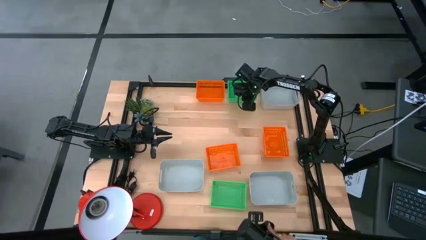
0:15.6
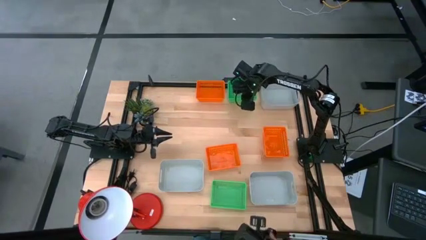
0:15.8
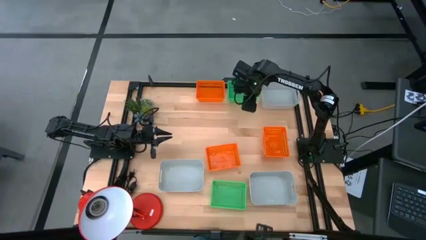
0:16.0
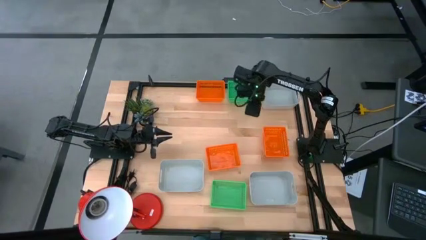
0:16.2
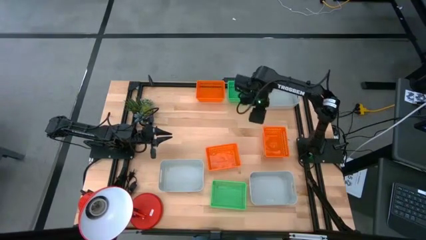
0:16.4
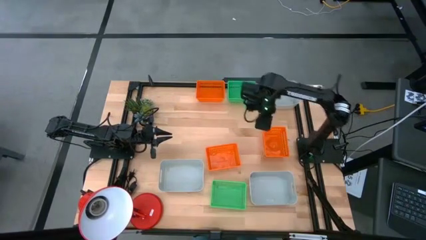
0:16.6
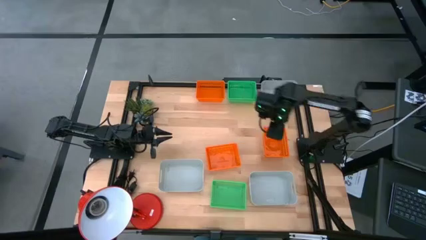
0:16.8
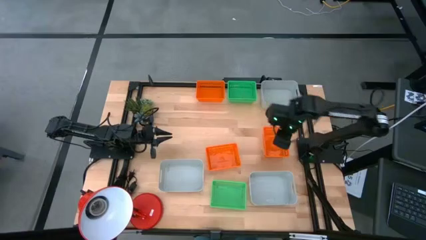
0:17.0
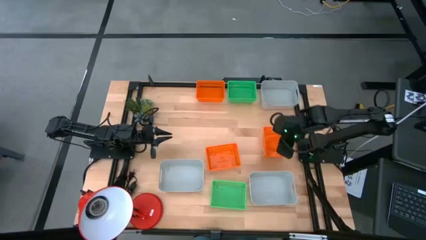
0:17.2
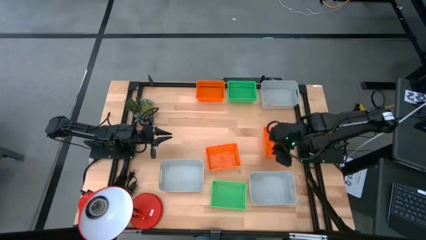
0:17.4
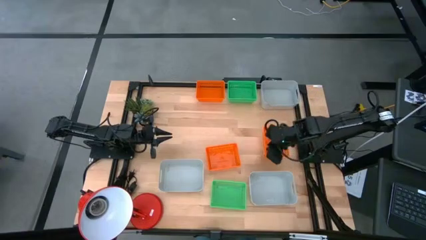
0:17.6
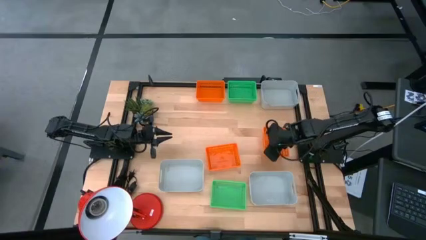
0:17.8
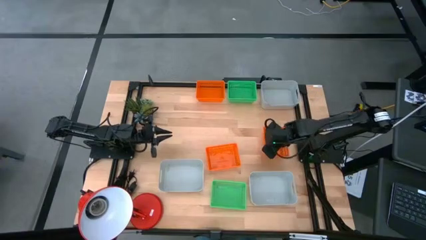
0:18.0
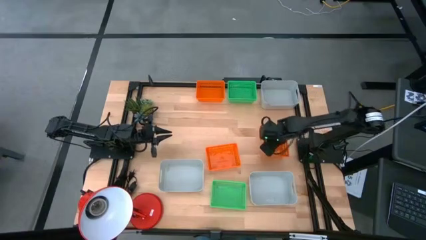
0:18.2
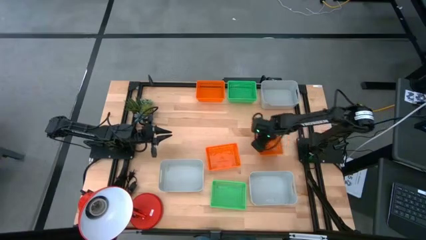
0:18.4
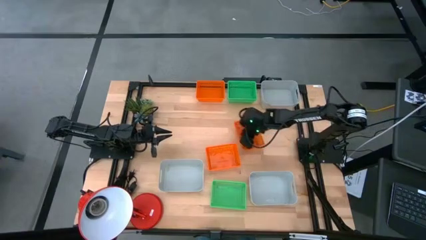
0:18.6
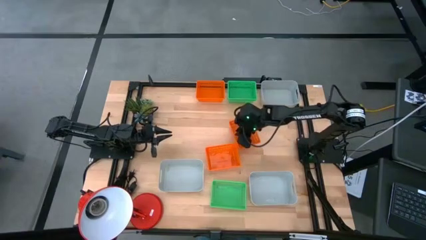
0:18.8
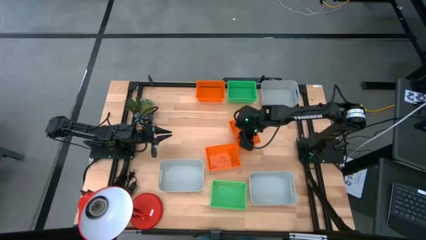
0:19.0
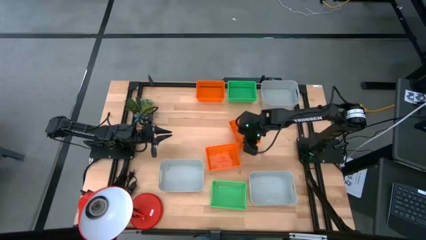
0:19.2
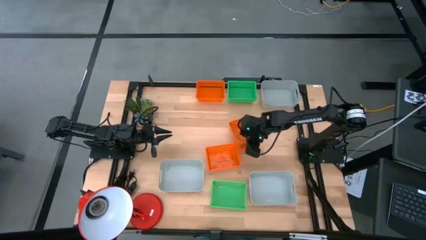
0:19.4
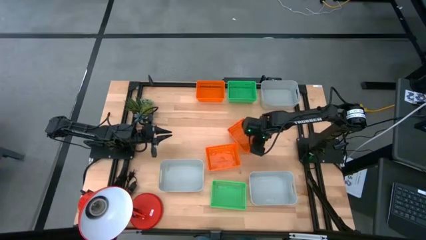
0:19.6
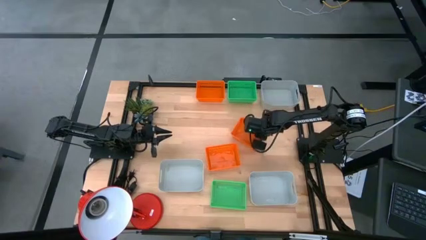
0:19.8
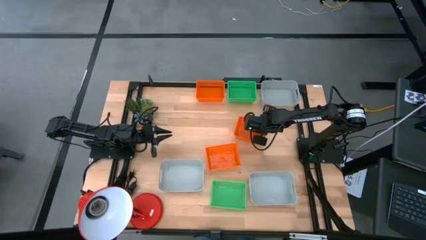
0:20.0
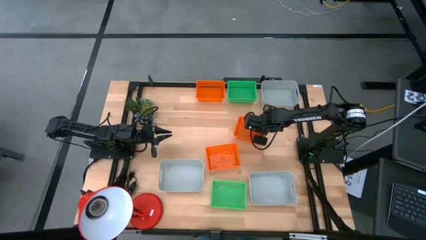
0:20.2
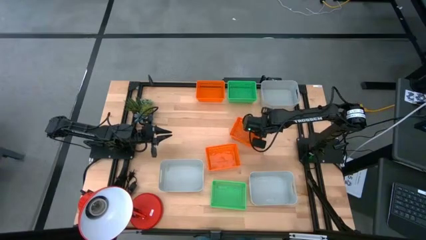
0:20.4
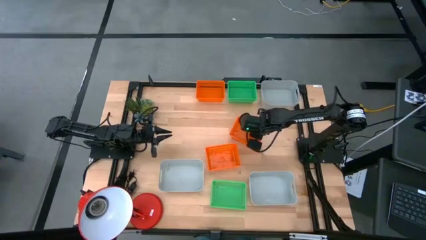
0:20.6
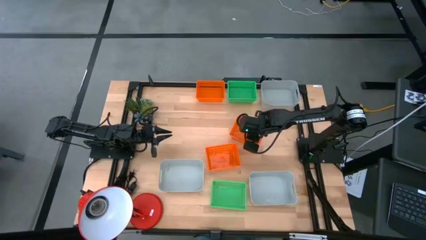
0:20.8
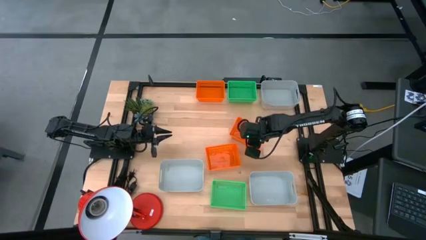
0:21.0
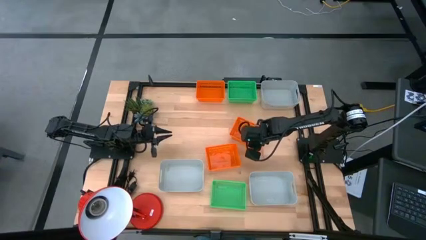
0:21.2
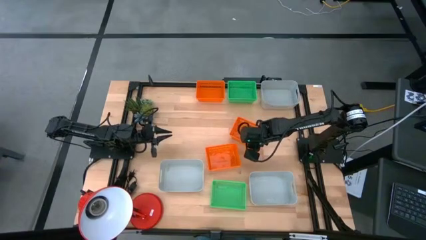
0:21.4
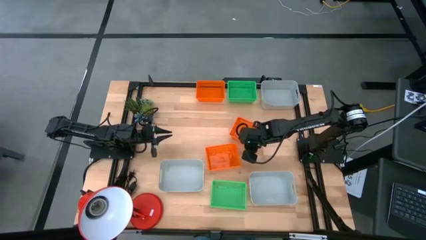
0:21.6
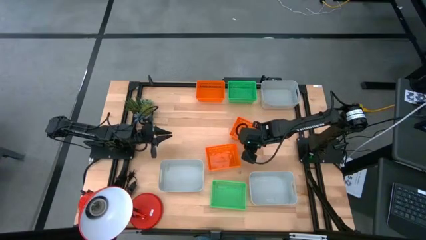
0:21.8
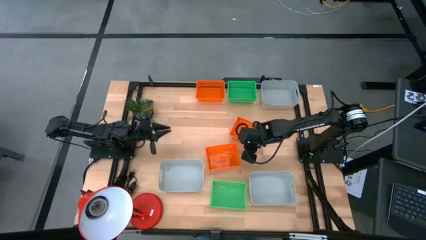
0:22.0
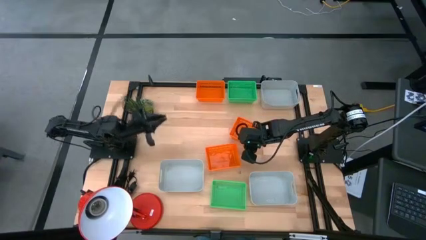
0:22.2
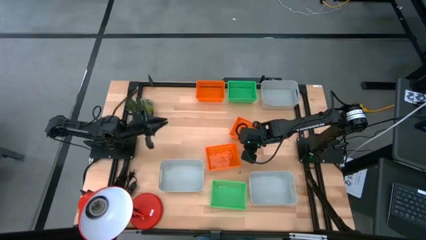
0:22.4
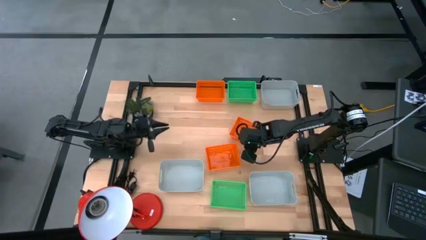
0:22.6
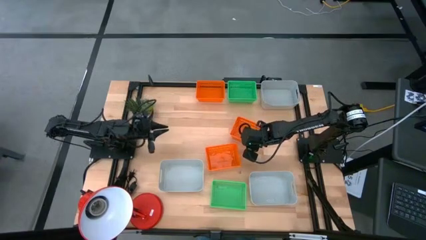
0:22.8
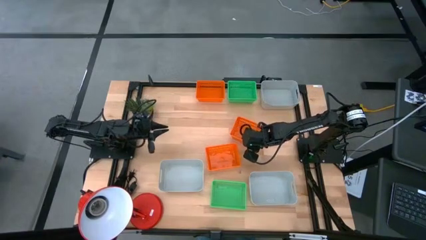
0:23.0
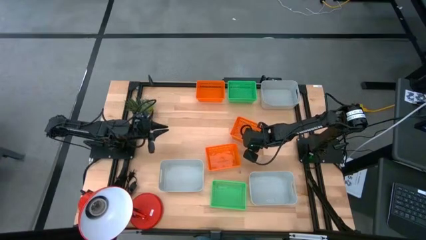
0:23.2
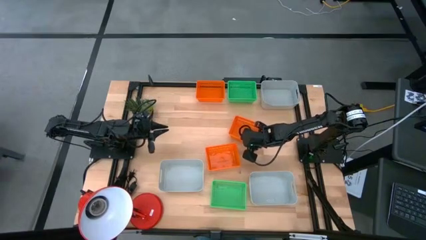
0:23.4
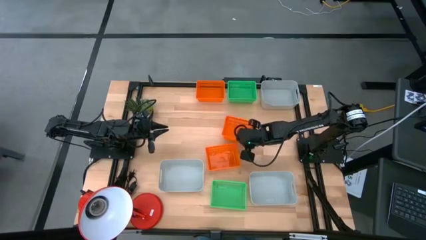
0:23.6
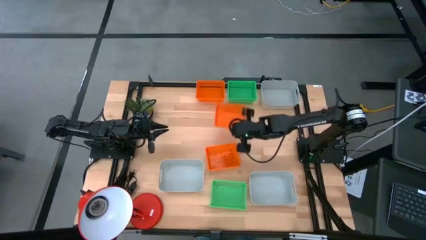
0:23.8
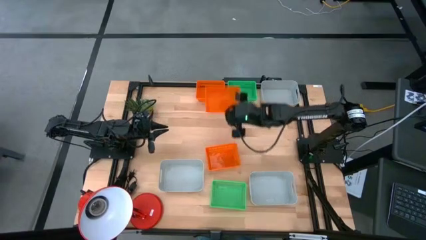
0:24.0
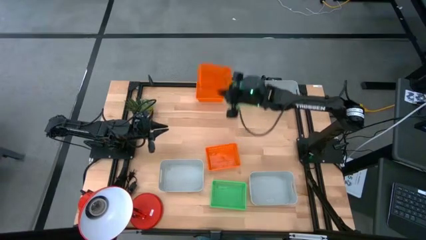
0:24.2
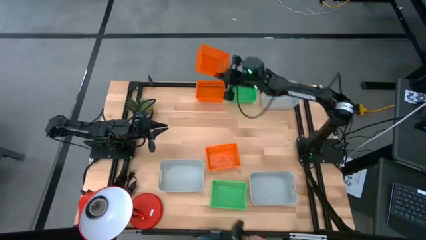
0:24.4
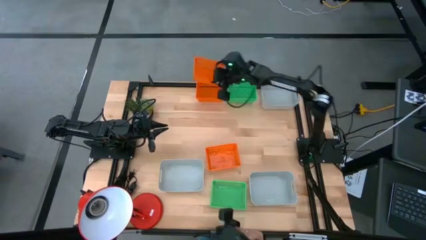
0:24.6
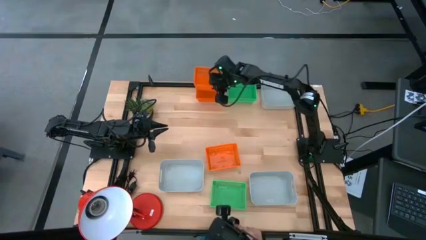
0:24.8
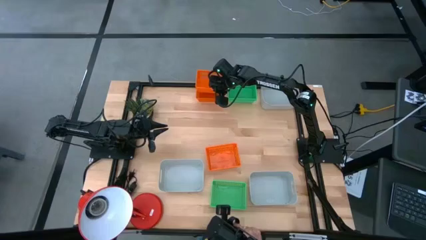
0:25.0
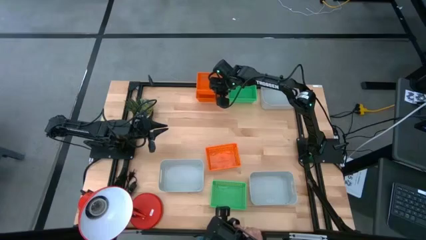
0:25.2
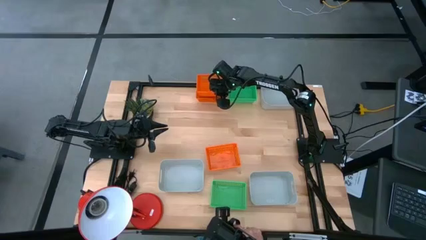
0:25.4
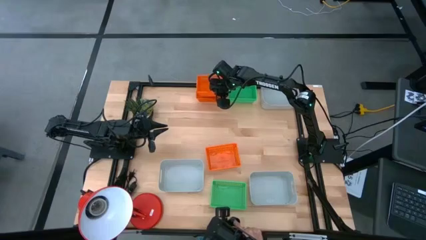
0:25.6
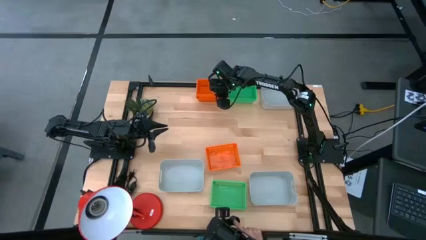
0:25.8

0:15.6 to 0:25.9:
Stack the bottom right orange bin on the top orange bin

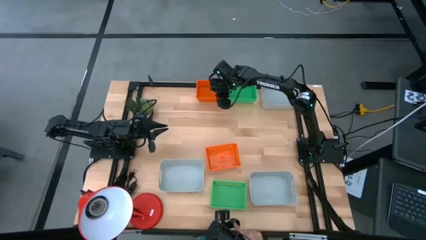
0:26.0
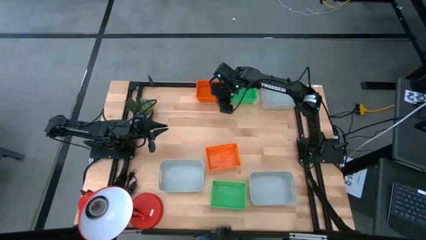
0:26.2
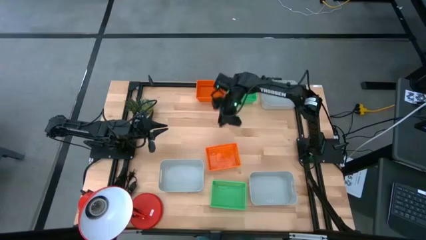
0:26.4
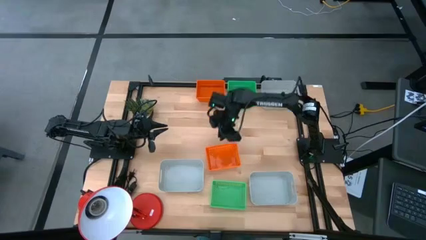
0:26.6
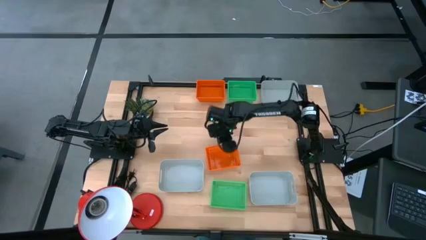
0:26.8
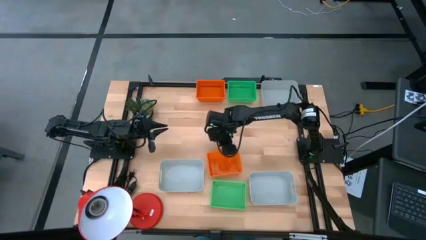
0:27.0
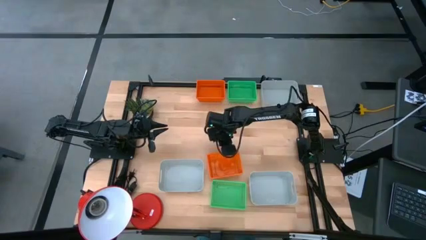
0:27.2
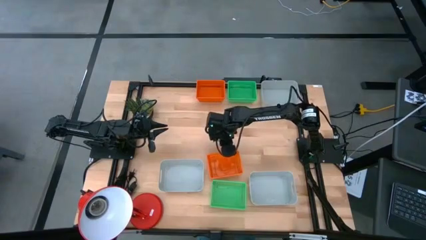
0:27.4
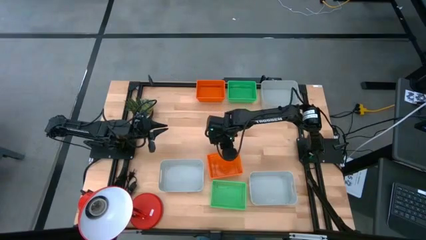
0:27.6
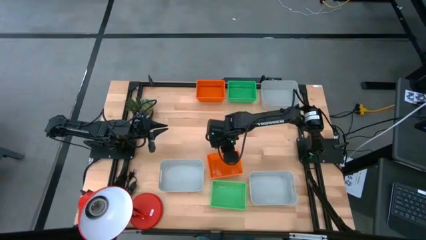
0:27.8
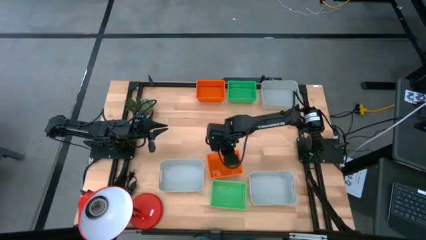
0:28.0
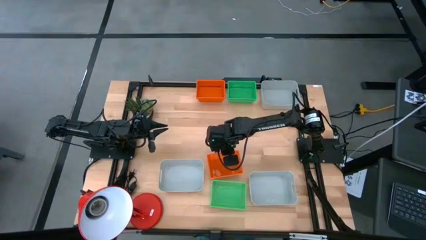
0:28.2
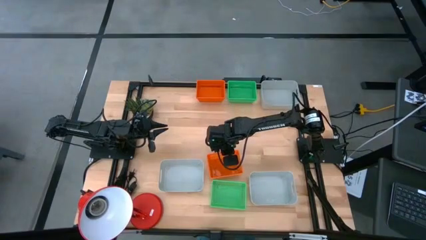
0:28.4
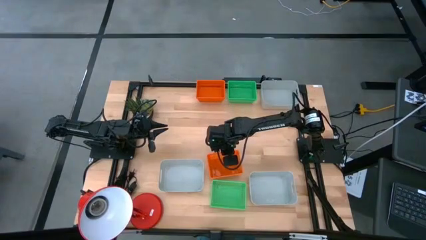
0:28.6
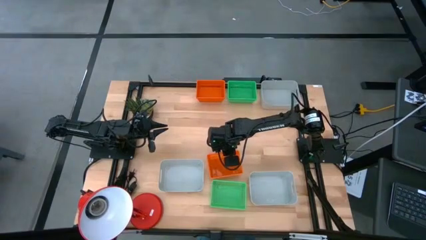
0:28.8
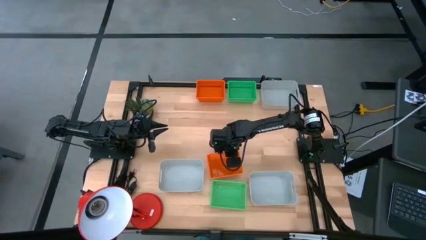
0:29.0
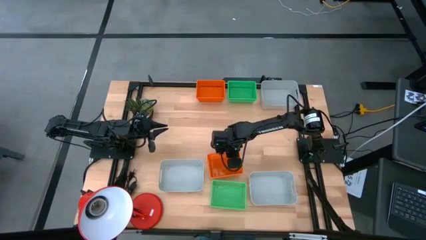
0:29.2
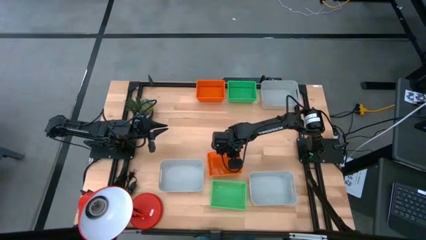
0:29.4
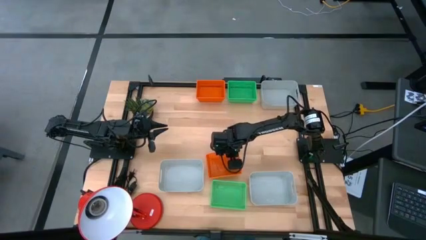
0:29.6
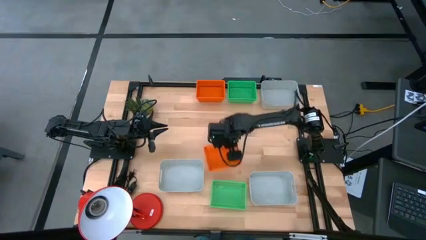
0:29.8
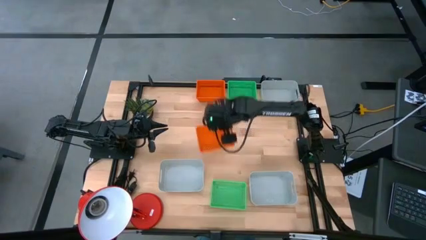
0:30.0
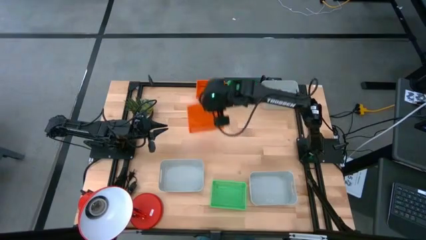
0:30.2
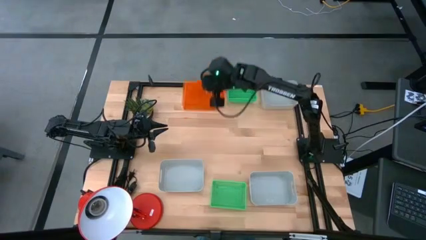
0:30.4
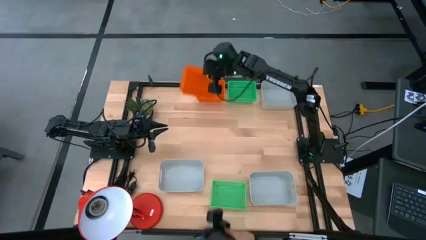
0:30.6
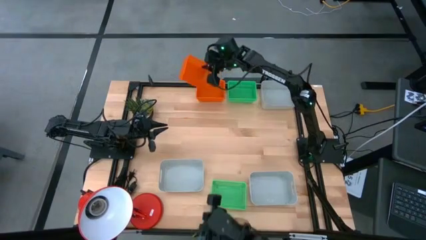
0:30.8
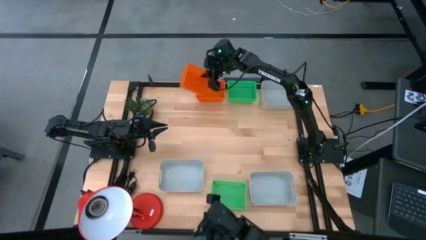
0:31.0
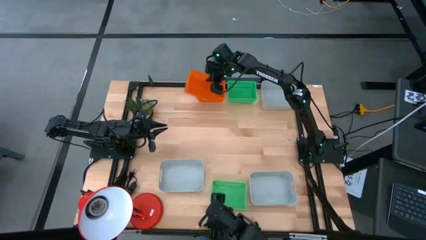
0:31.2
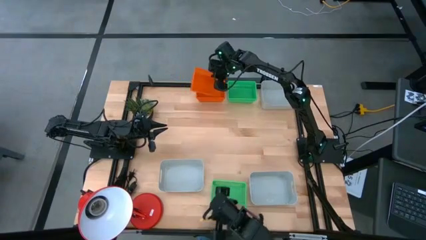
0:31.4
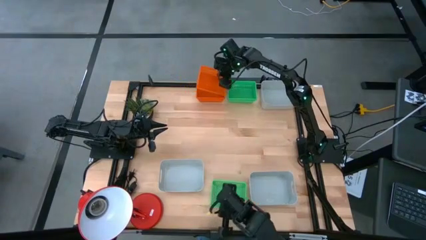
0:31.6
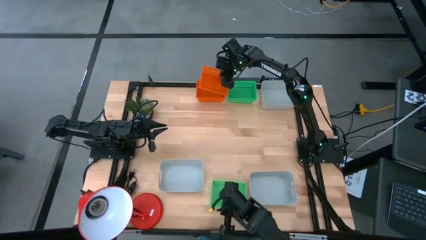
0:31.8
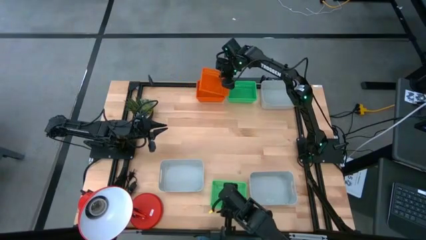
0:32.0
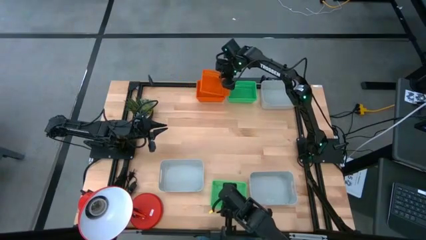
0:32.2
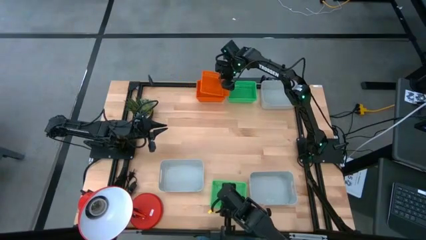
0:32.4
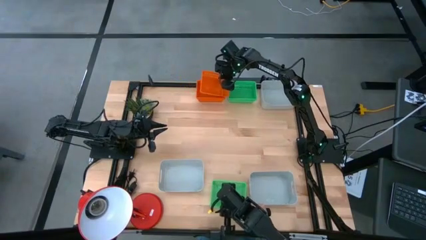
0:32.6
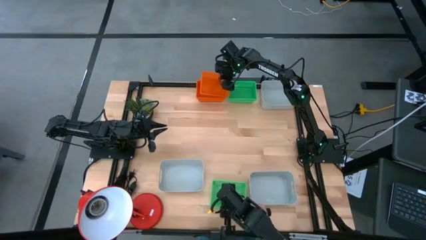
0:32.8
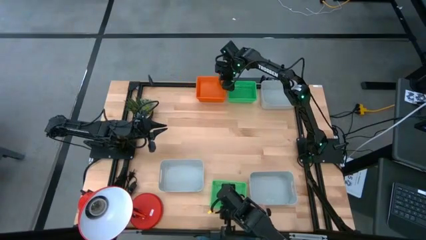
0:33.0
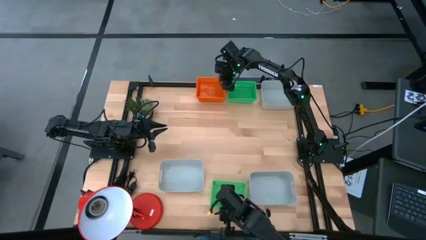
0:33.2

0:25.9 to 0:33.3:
Stack the orange bin on the stacked orange bin
